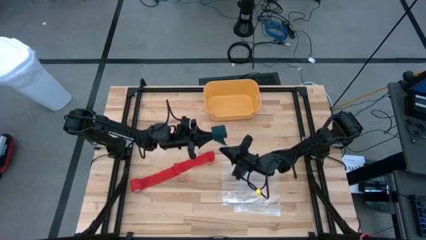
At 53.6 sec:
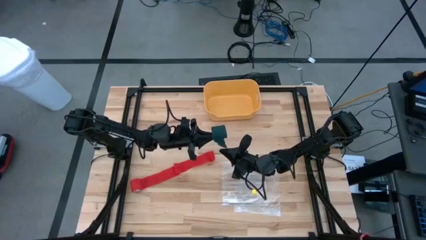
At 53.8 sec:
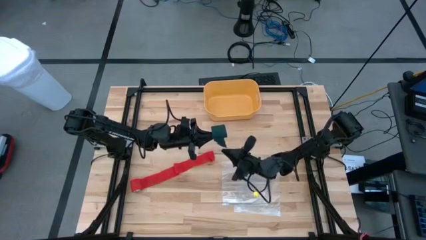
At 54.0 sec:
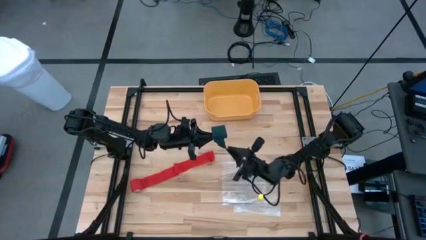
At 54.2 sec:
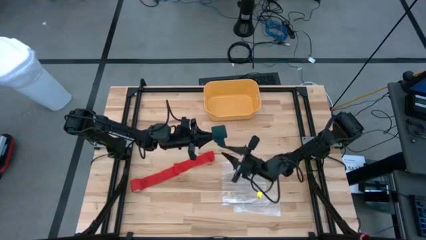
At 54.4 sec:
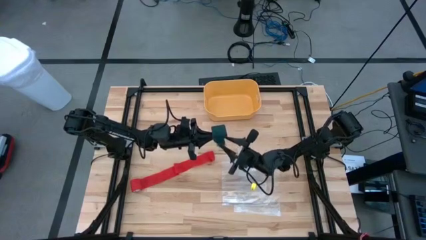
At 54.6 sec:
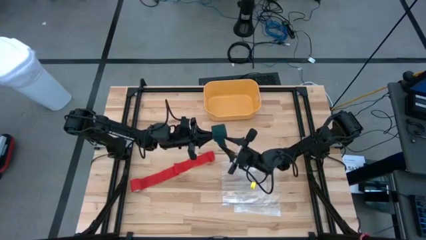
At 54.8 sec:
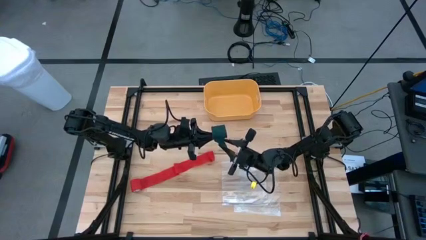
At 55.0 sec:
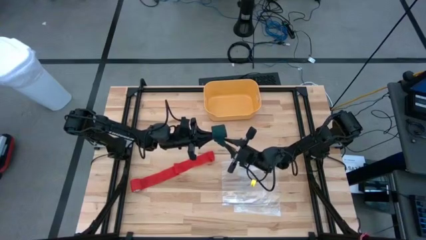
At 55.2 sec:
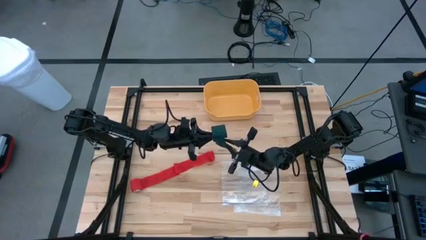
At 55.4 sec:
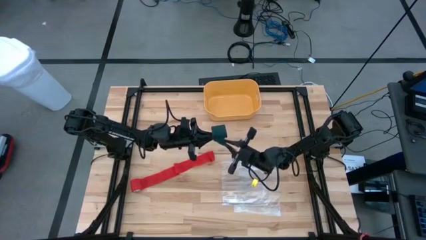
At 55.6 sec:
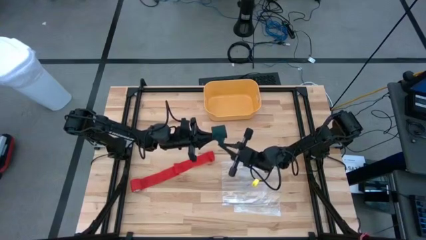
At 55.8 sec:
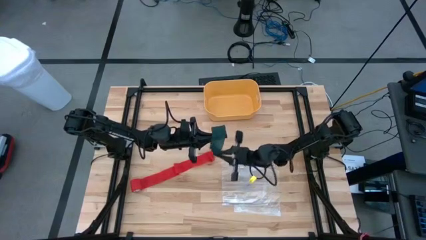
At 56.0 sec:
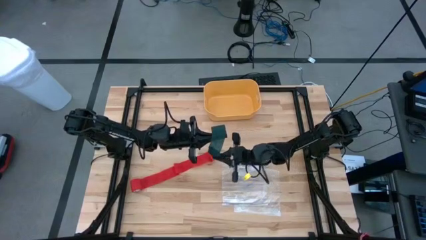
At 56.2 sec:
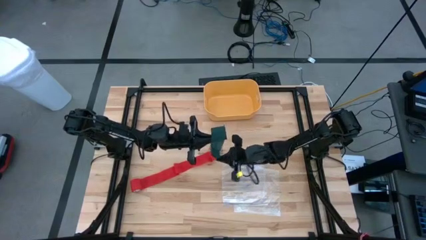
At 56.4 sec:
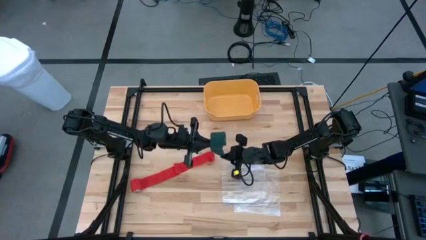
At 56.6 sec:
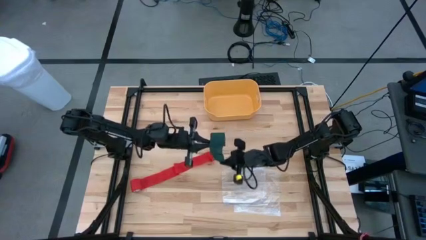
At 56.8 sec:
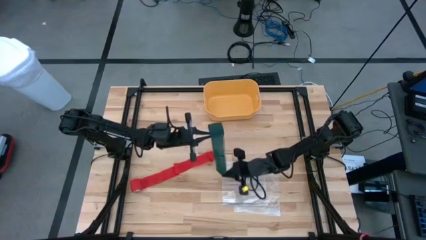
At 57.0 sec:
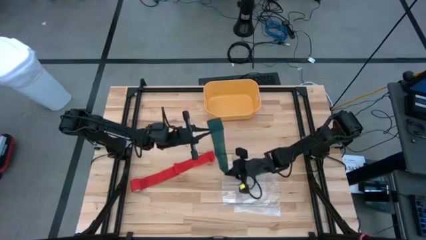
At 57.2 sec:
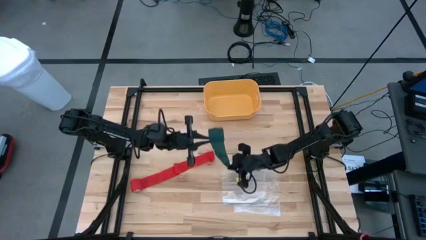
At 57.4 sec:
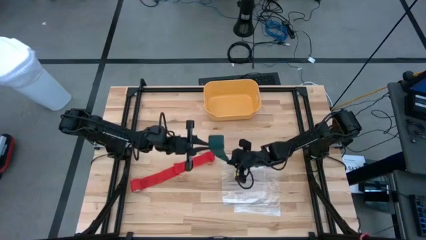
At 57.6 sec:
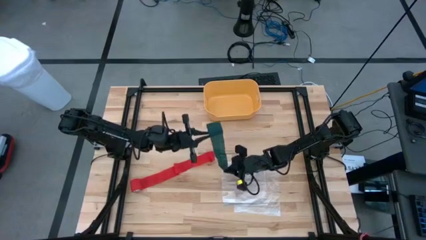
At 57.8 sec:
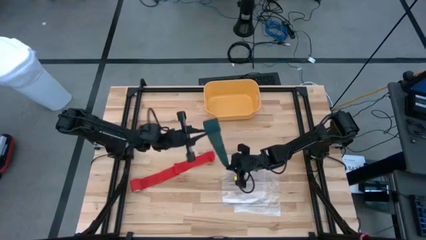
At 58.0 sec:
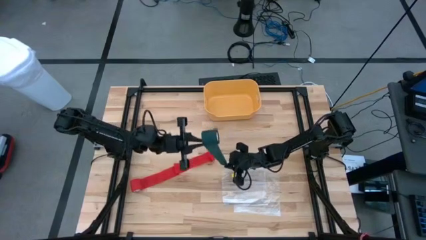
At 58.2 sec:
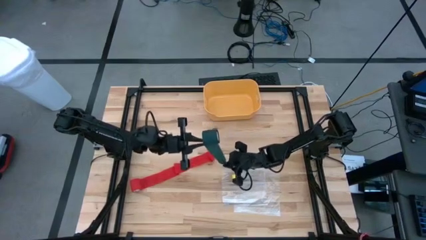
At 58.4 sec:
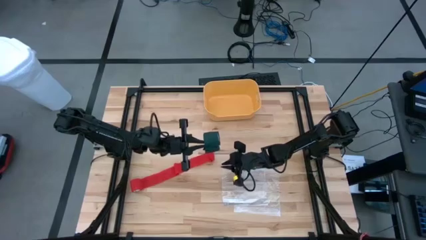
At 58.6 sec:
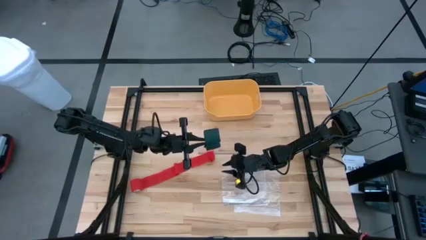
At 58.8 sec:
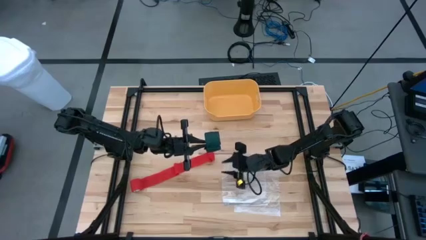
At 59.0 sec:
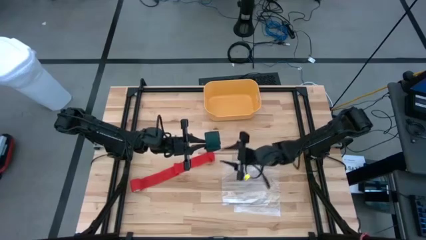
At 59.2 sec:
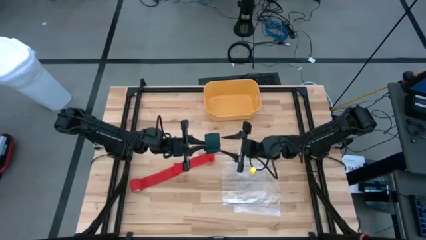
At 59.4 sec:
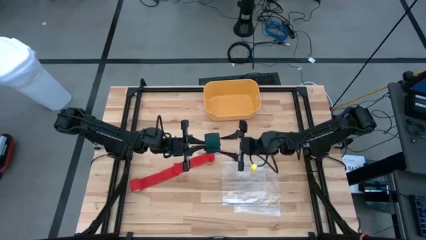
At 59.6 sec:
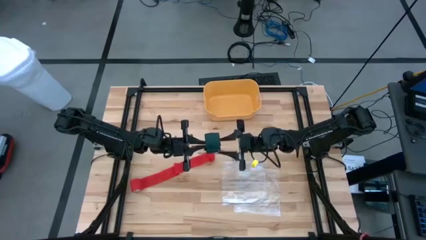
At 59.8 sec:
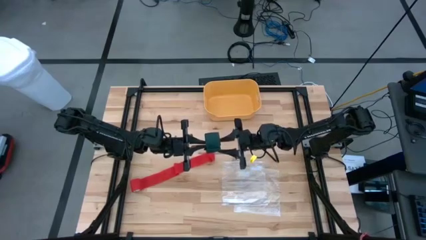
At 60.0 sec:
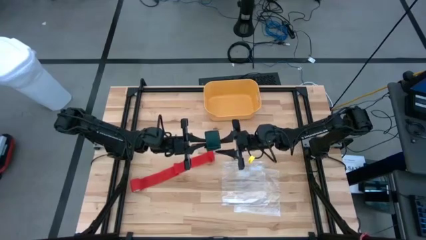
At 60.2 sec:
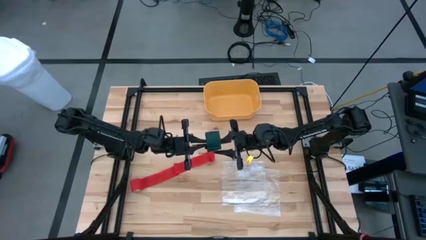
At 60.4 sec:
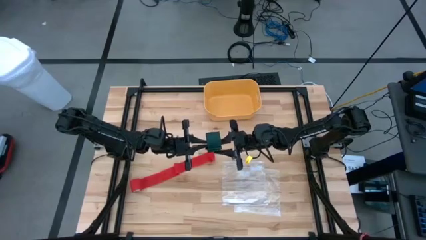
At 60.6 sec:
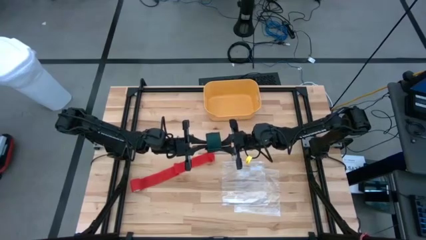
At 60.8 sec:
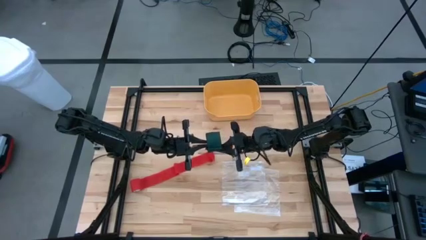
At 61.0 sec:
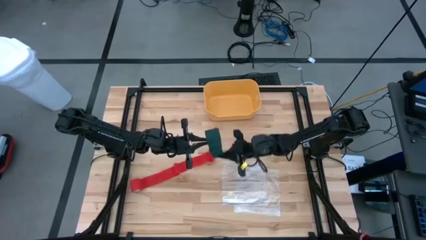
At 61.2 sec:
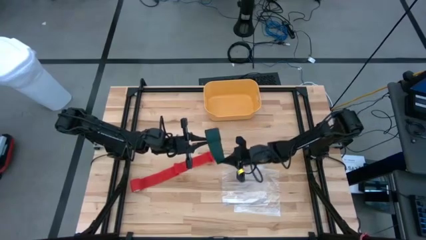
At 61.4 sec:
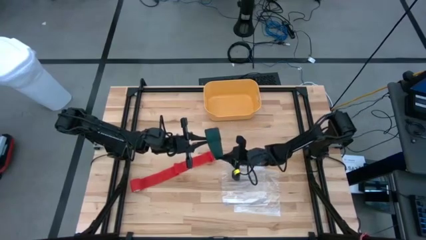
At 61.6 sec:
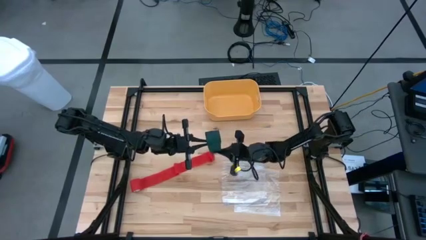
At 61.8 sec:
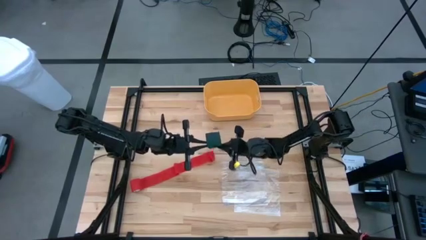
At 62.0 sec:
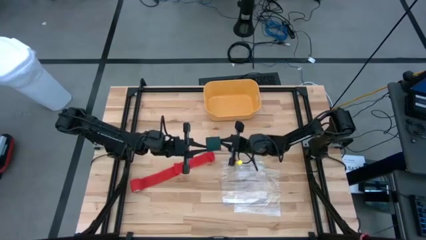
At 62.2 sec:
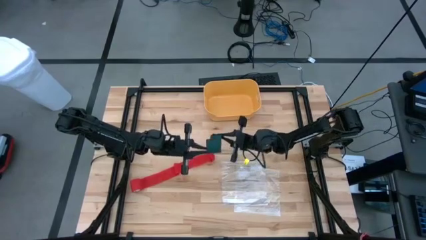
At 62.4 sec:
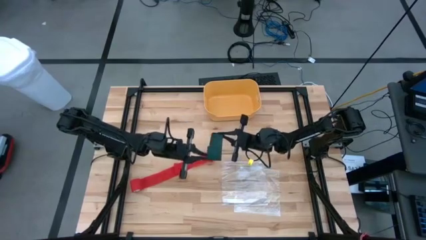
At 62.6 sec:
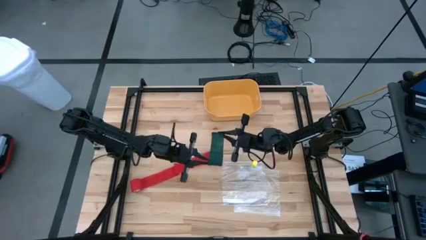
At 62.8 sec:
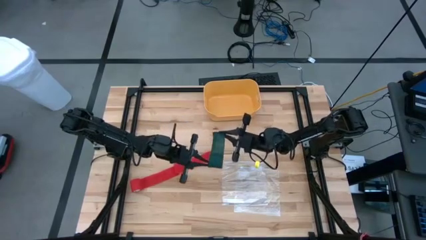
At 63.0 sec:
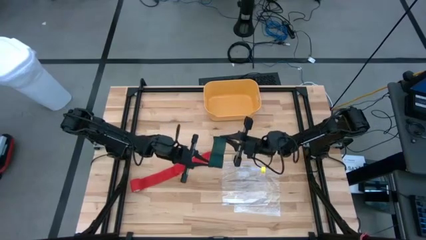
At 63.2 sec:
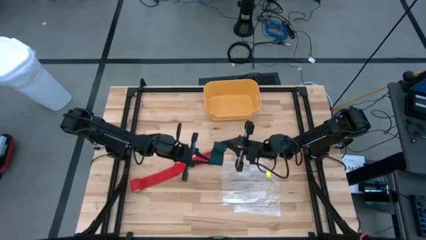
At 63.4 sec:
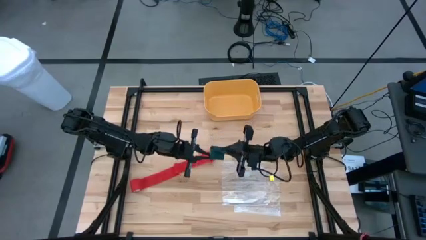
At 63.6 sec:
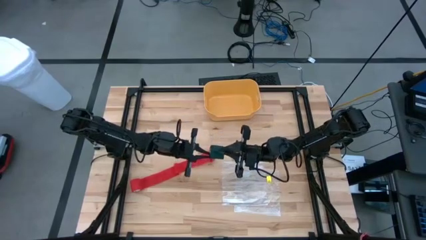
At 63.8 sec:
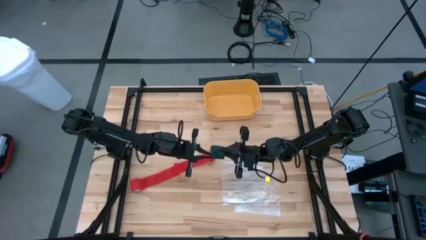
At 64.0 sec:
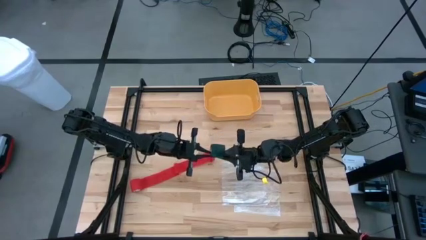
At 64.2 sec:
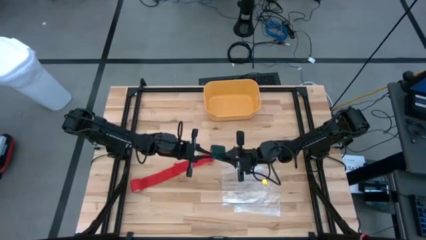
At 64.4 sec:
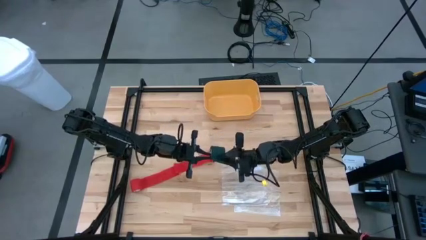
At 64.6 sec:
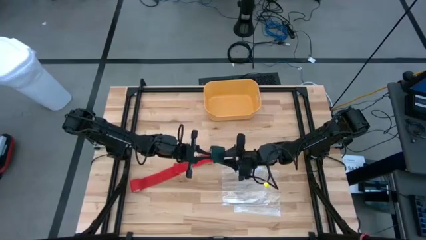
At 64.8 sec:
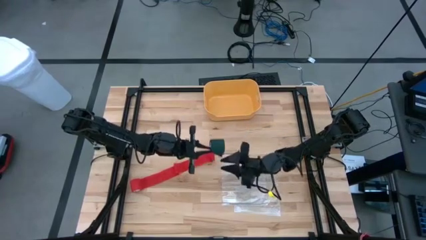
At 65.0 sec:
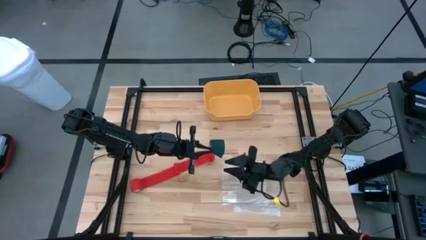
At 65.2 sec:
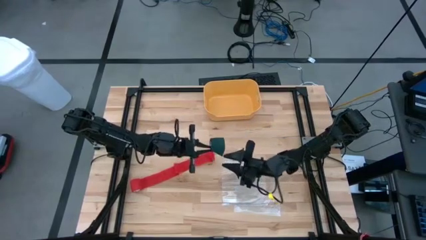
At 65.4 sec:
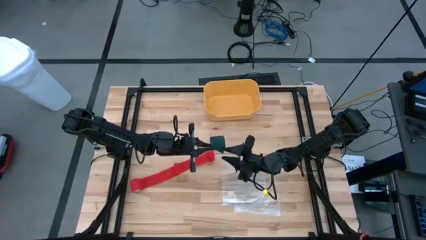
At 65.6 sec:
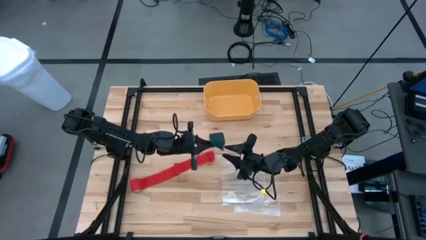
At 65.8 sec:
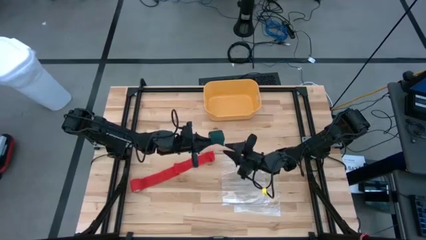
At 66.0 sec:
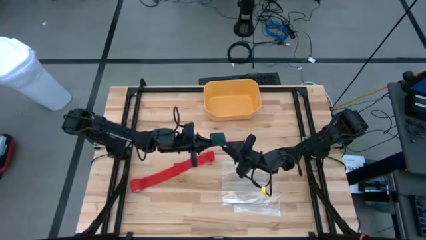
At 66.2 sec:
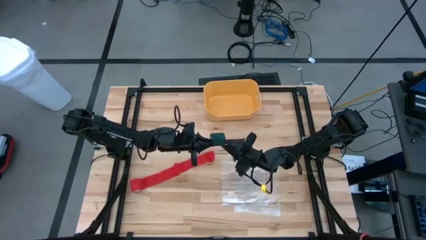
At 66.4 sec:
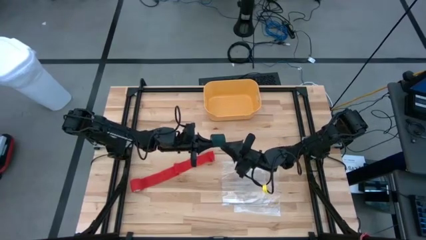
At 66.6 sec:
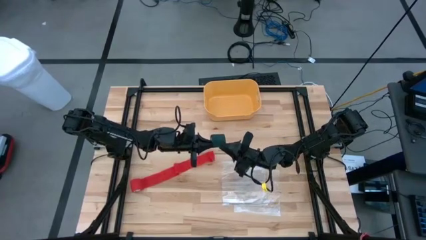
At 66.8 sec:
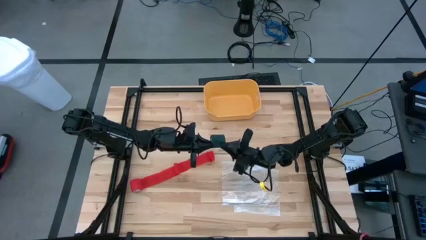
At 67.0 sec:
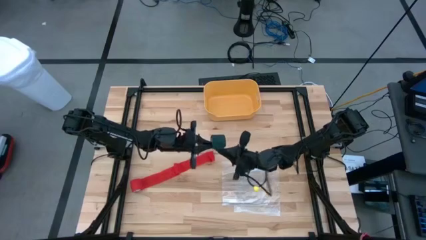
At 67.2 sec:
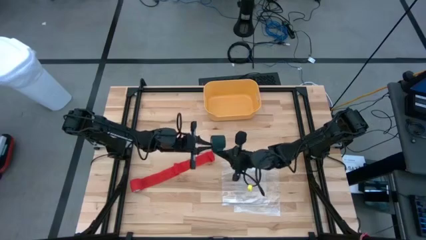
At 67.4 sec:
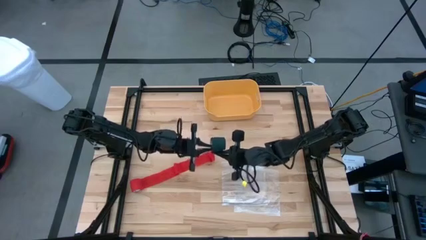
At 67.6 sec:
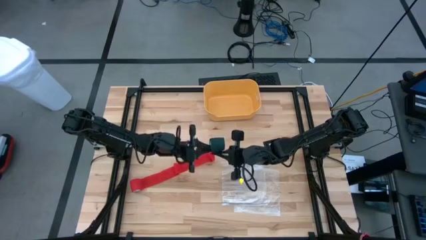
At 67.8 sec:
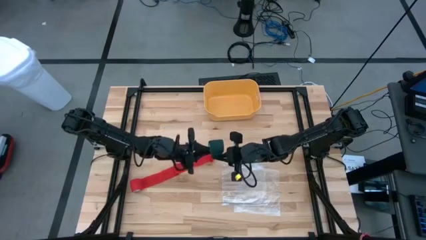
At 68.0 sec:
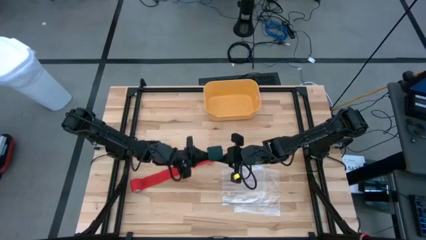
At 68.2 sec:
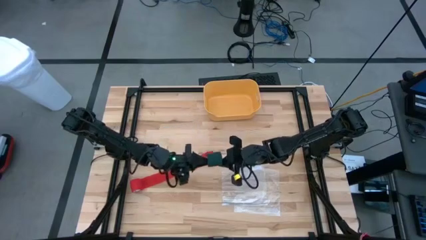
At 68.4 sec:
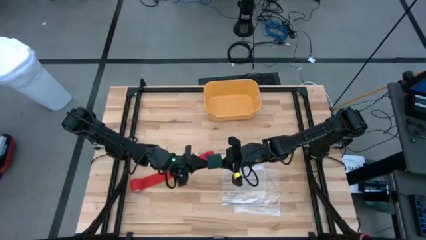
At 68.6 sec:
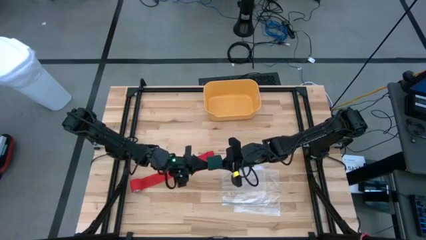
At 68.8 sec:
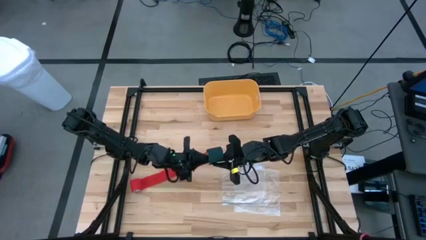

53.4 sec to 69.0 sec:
Task: Roll bandage
Roll the green bandage
